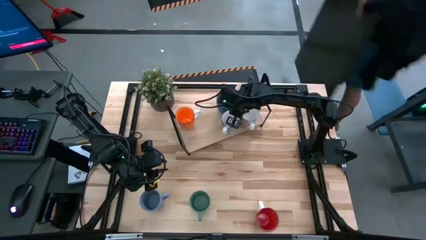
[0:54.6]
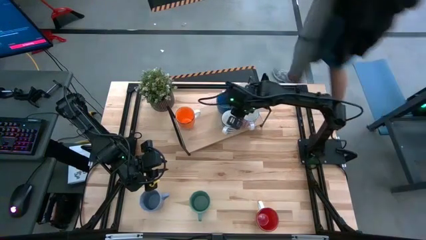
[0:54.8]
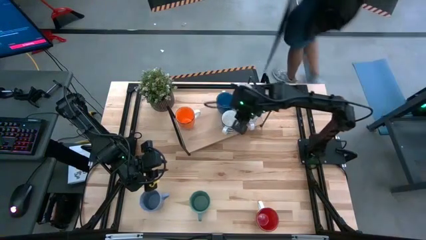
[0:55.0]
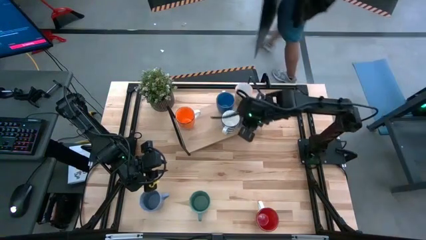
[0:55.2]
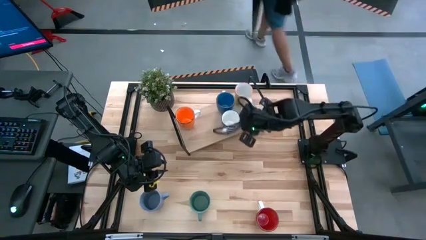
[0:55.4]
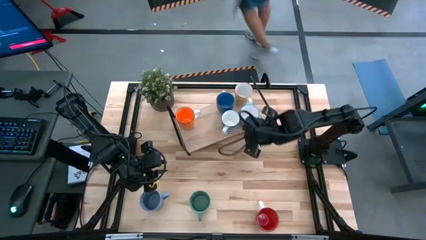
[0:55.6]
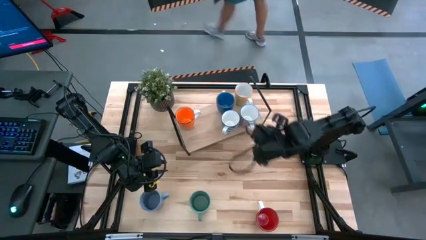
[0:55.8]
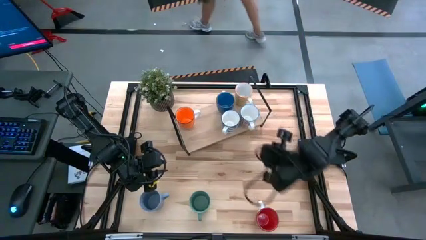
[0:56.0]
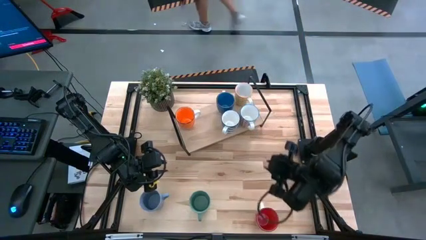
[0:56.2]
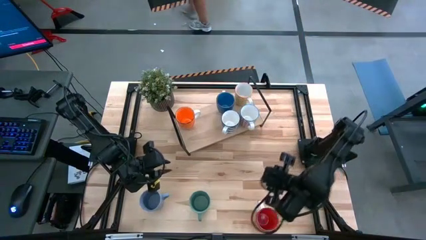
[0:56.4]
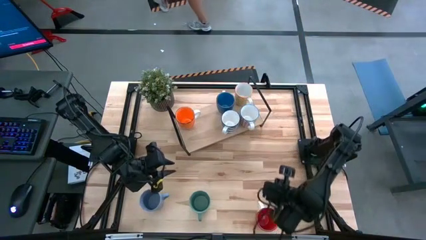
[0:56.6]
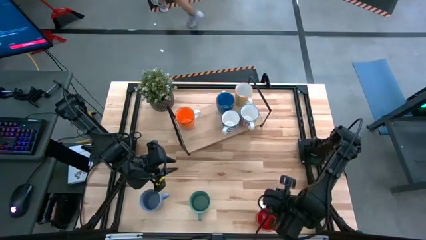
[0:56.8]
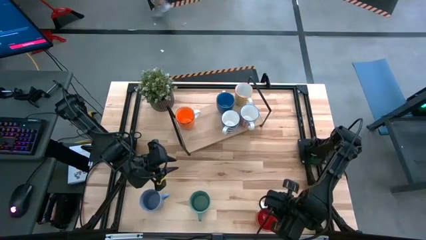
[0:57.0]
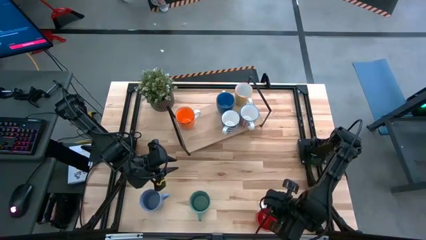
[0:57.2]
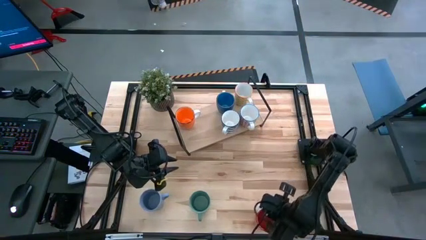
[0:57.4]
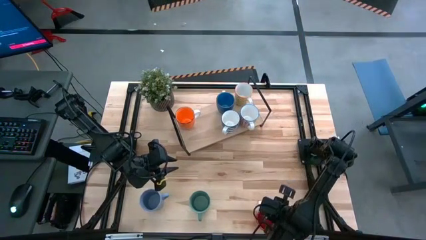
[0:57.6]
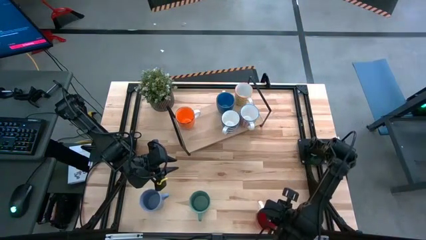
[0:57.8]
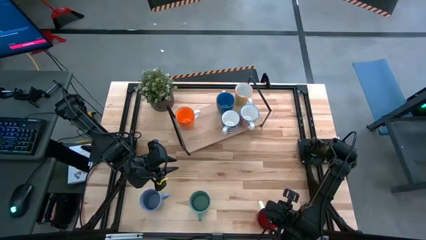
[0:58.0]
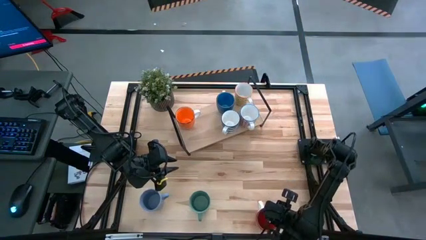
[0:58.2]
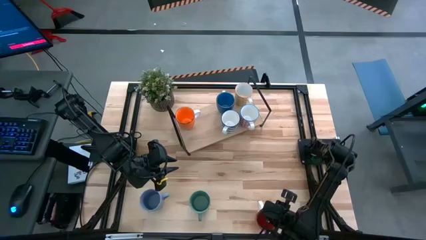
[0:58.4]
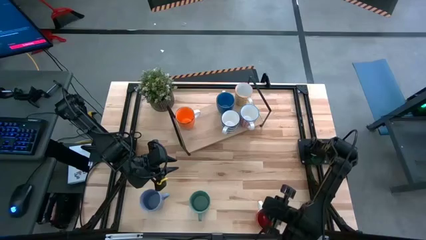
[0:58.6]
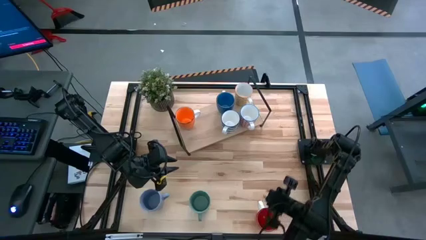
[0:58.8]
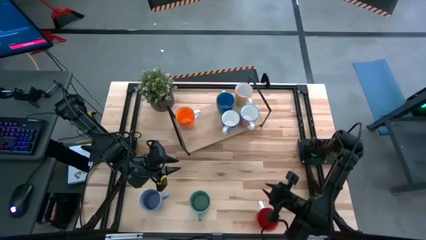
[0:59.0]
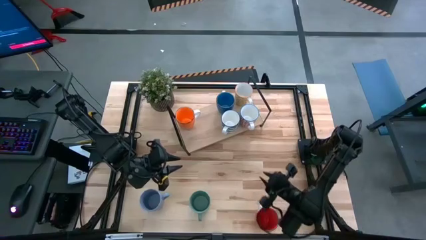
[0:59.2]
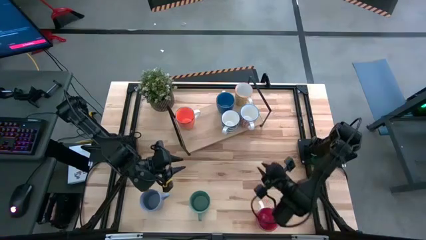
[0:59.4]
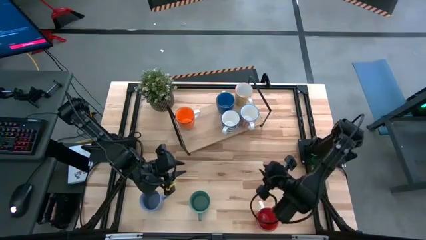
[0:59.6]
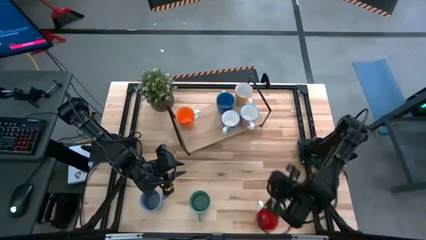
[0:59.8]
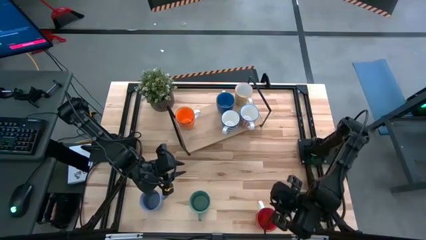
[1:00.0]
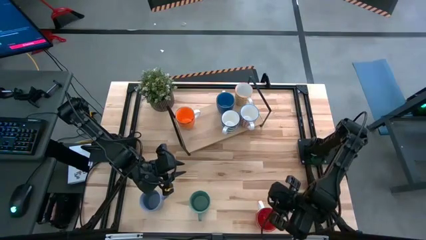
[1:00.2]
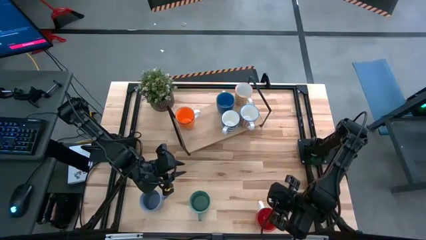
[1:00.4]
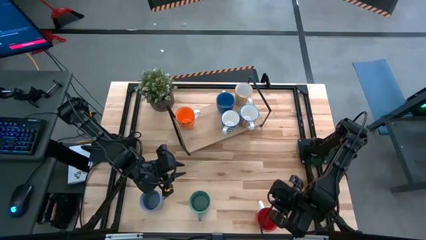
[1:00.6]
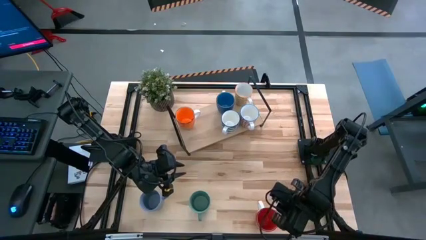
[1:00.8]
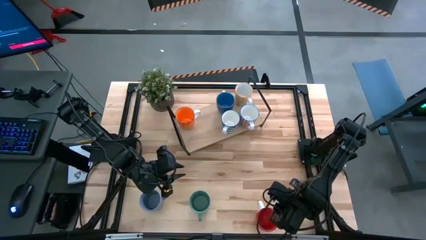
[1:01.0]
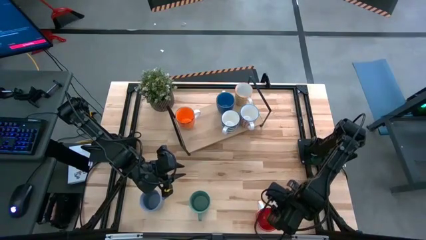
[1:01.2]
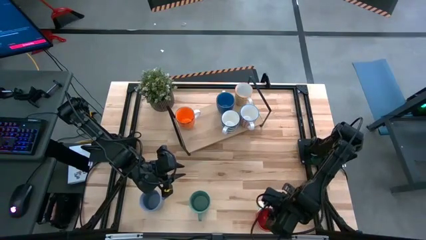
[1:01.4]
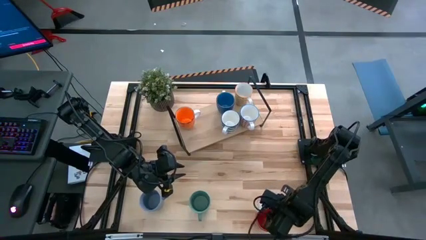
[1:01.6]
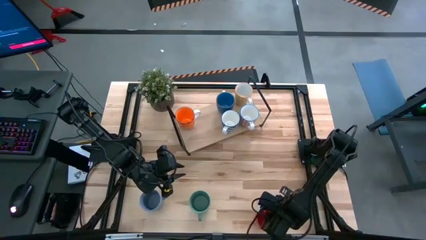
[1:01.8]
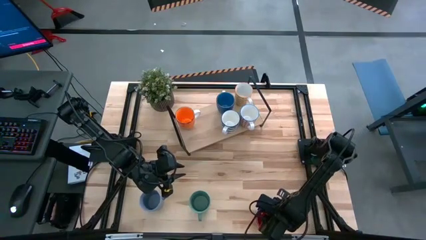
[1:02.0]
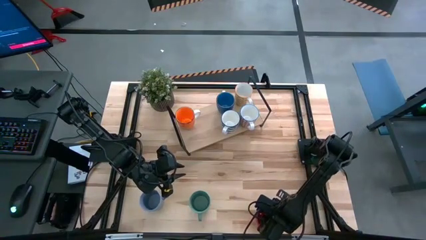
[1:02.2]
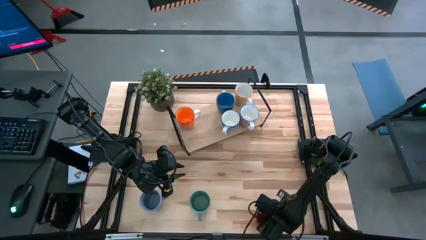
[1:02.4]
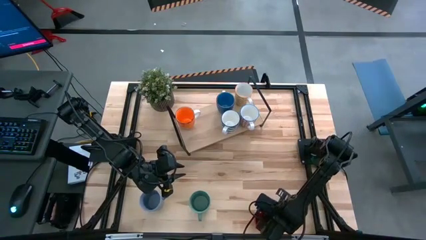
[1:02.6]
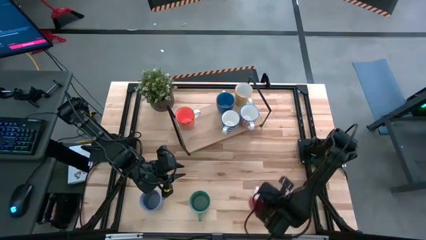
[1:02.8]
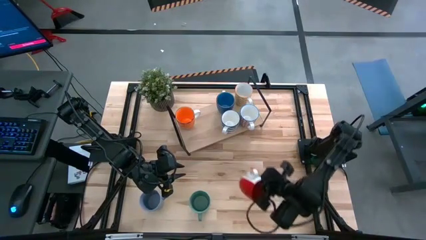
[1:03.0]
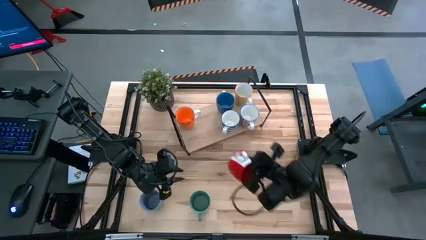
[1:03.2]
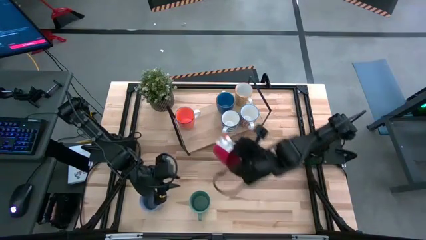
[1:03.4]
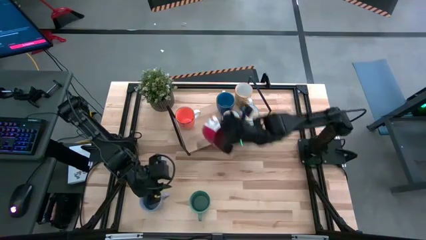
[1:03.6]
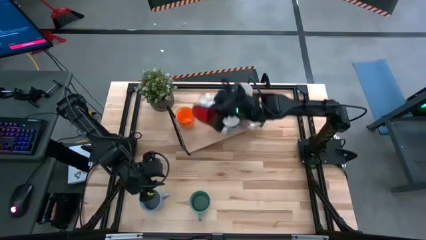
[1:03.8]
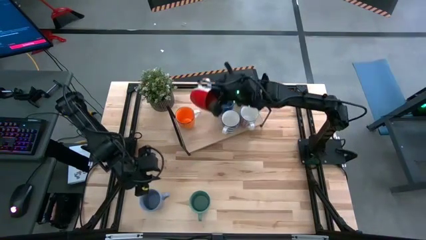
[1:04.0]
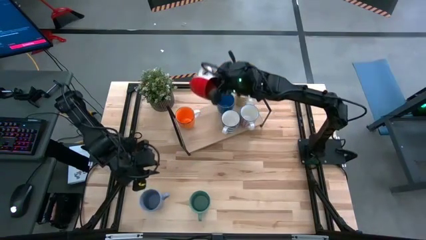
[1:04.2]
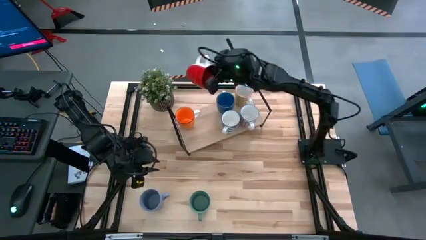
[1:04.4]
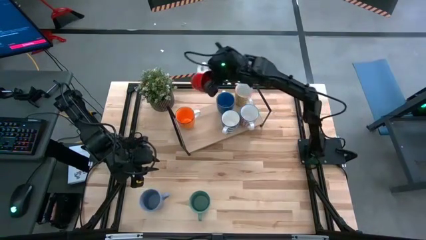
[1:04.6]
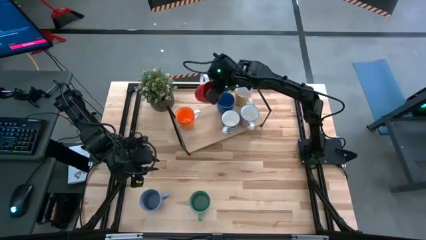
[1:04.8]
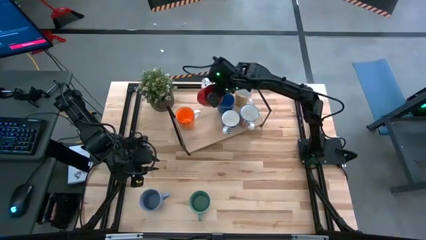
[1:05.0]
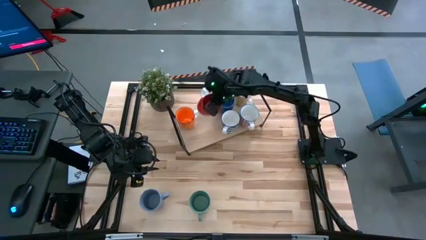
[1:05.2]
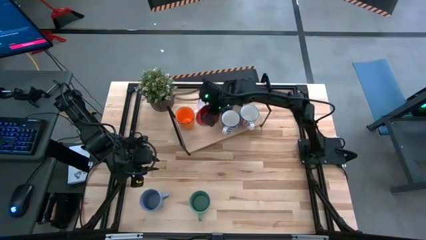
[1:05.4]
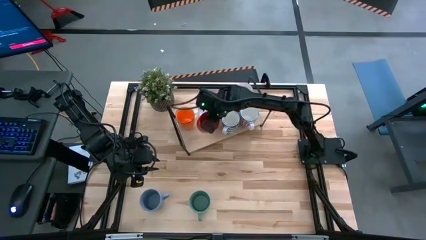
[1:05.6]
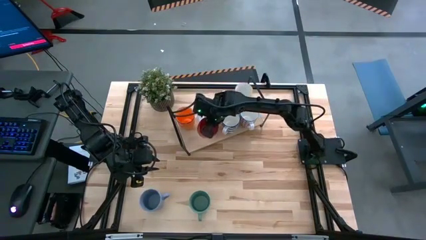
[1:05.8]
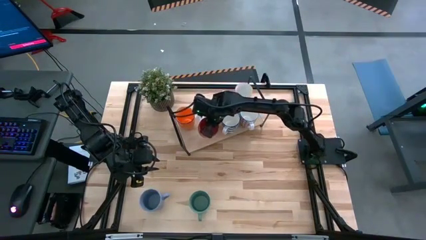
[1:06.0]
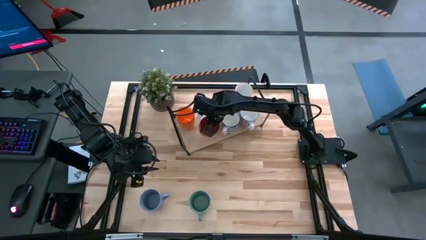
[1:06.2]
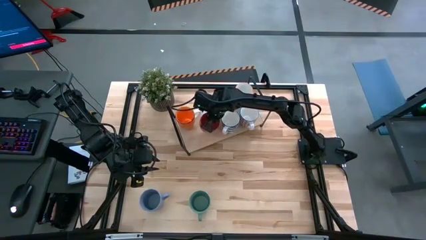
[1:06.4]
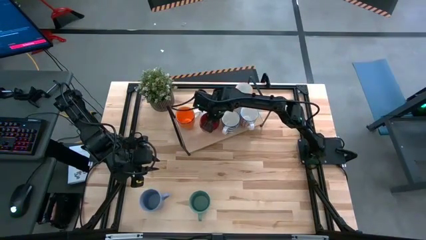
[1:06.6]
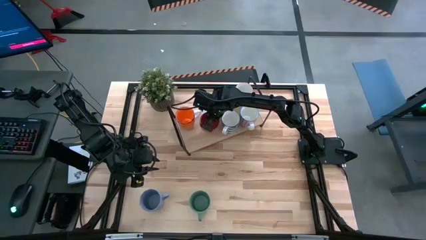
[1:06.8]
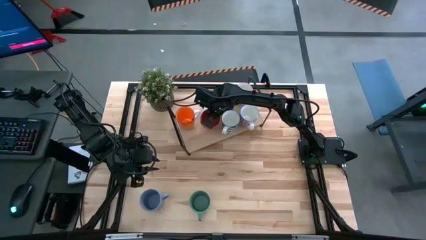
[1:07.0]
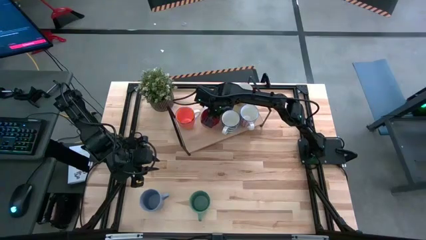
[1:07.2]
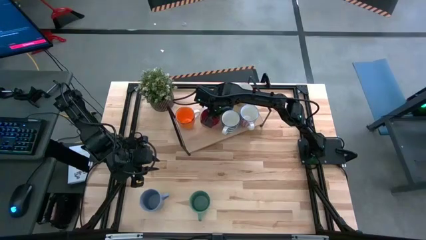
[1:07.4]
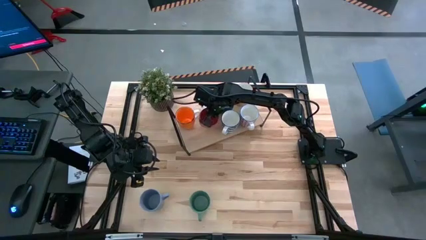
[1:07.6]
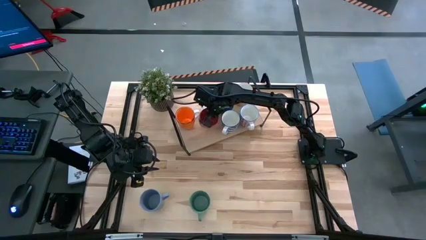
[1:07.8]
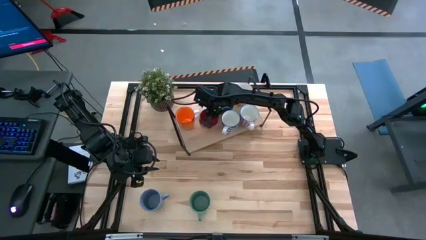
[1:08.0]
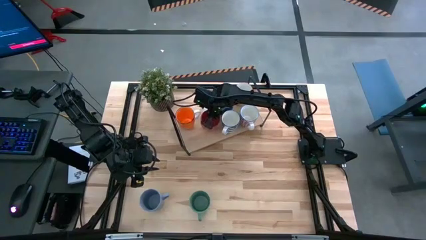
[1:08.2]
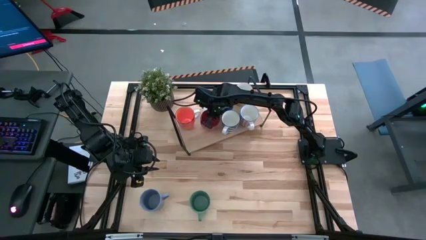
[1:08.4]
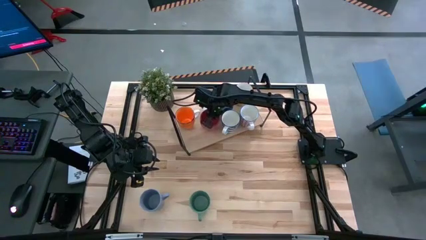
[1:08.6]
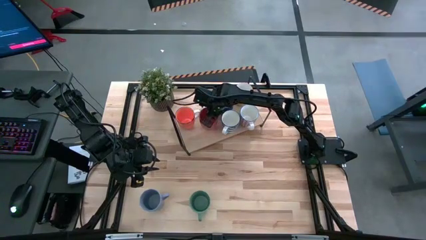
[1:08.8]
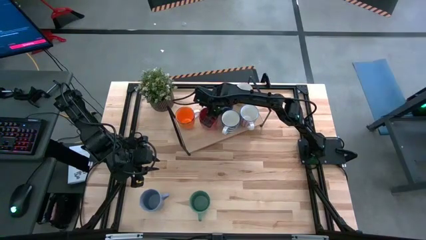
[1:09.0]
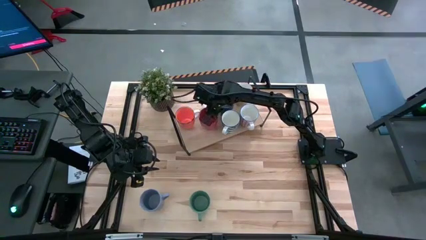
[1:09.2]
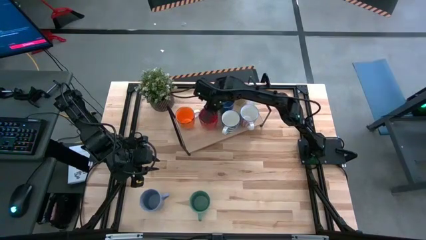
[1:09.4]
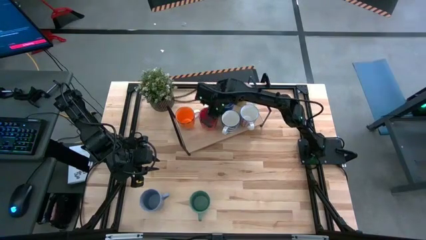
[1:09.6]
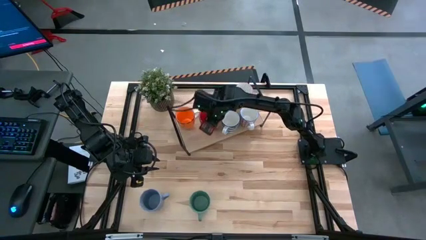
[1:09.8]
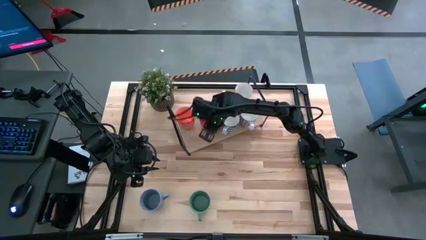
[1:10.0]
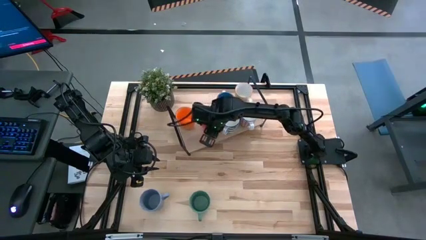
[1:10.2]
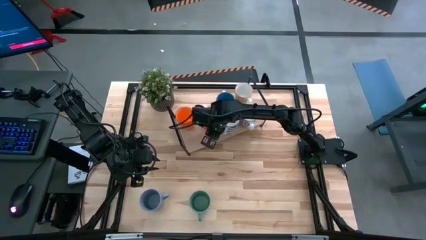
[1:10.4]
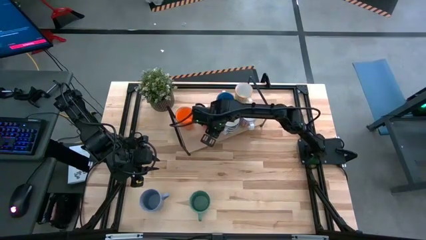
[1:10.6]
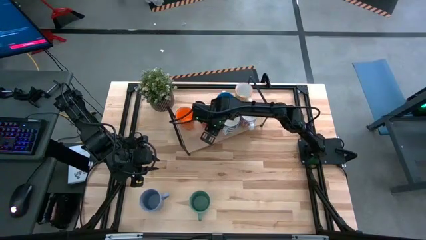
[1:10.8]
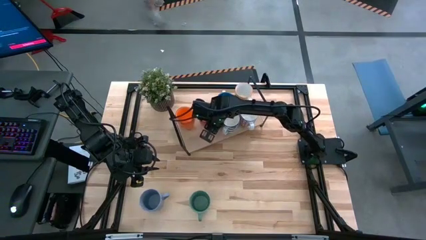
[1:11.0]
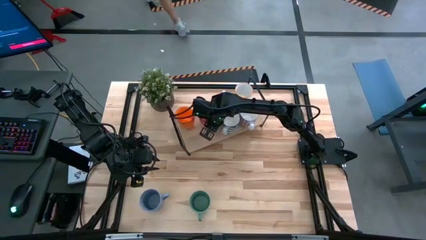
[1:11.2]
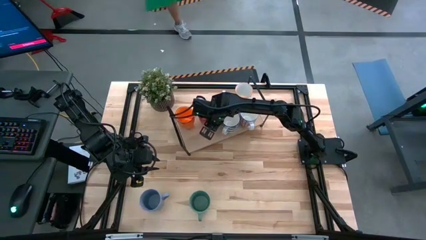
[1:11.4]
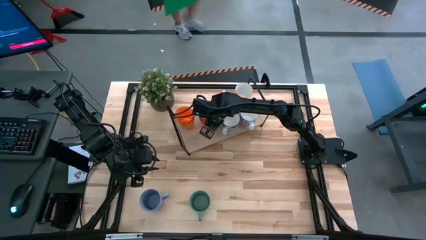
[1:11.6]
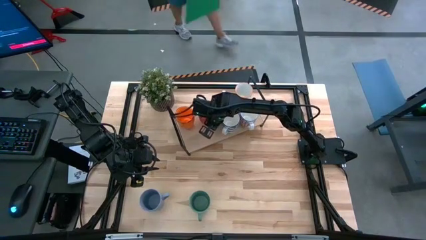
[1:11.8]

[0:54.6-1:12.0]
Task: Place coffee mugs
Put the red mug on the shelf
